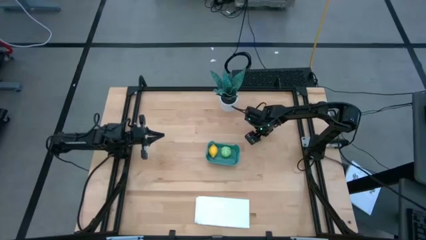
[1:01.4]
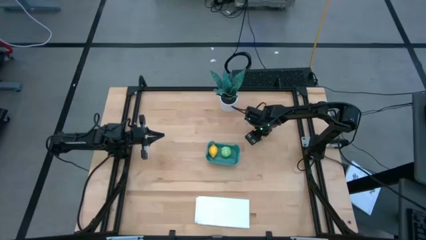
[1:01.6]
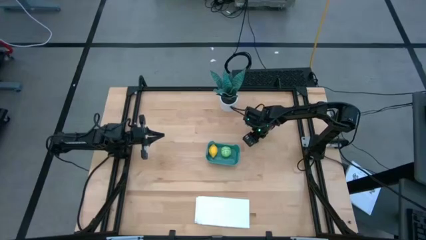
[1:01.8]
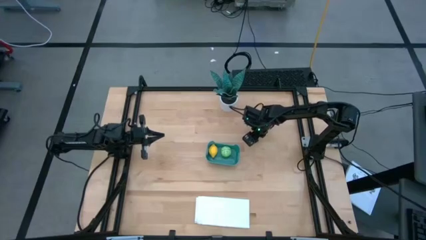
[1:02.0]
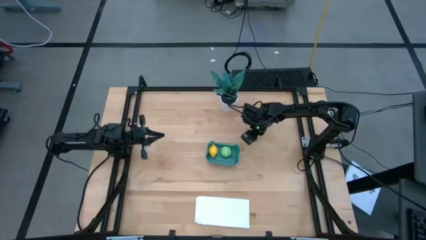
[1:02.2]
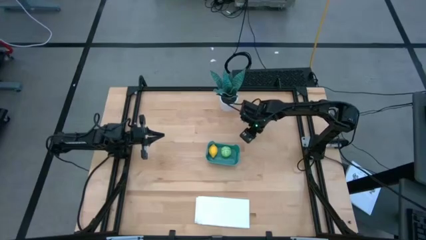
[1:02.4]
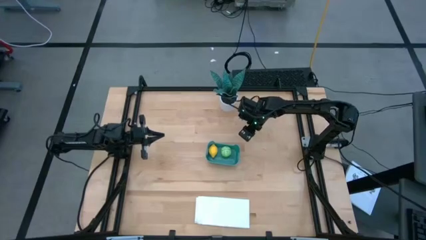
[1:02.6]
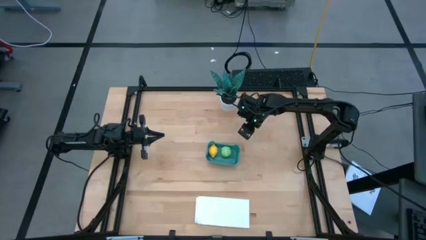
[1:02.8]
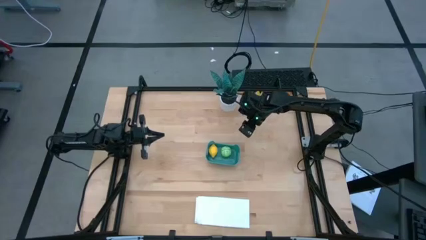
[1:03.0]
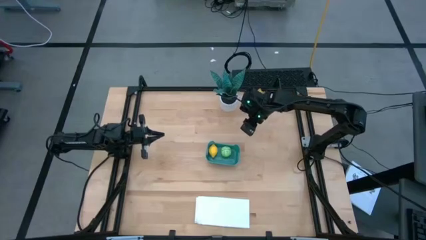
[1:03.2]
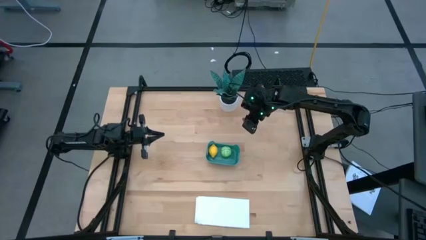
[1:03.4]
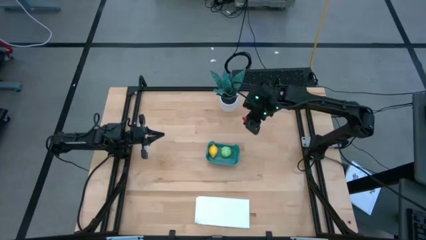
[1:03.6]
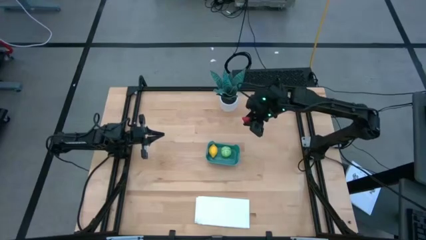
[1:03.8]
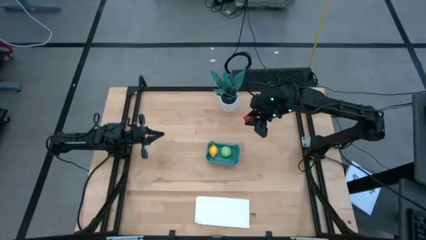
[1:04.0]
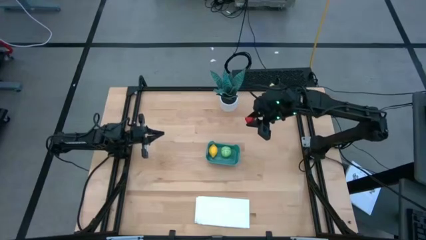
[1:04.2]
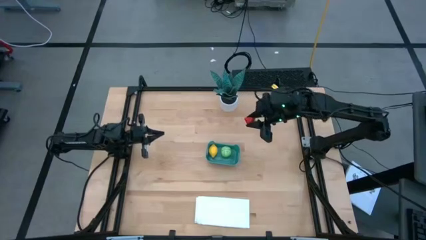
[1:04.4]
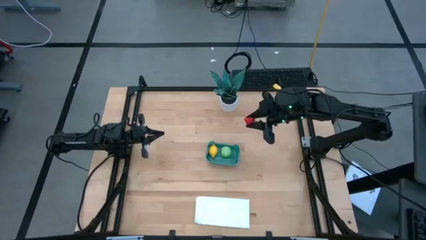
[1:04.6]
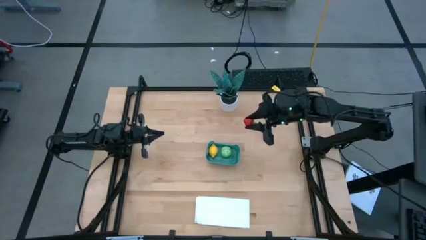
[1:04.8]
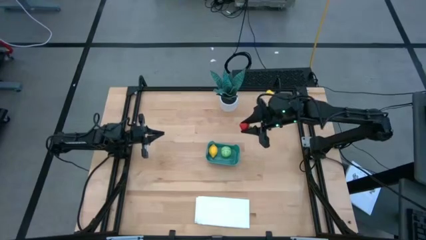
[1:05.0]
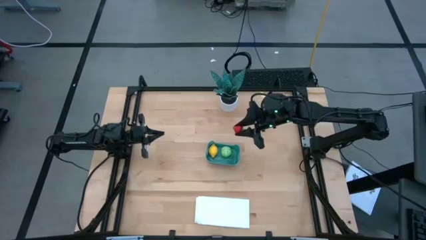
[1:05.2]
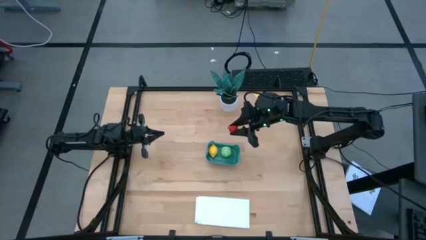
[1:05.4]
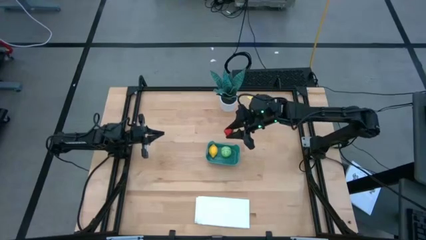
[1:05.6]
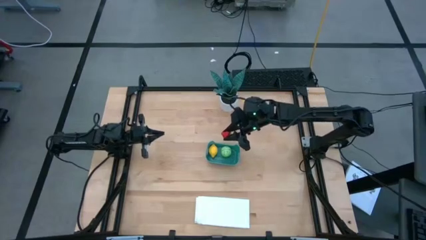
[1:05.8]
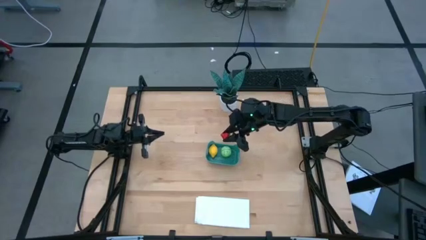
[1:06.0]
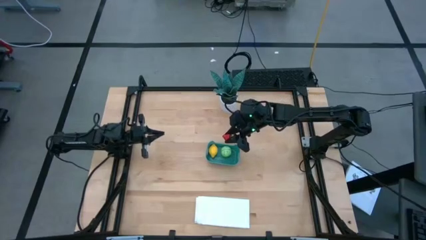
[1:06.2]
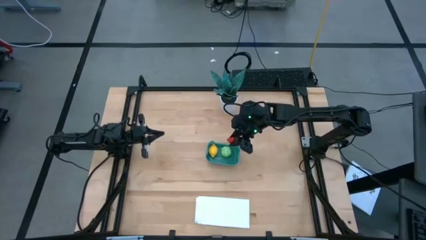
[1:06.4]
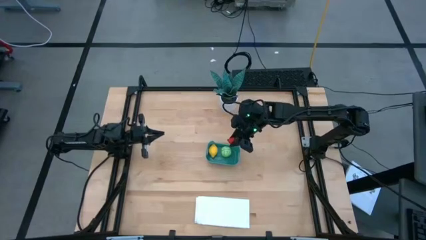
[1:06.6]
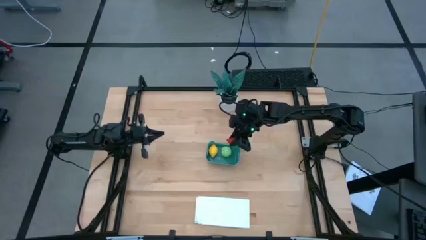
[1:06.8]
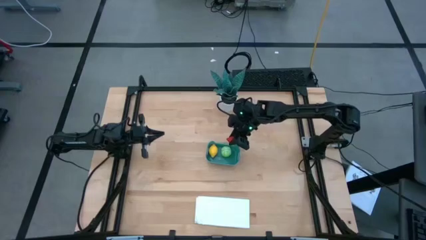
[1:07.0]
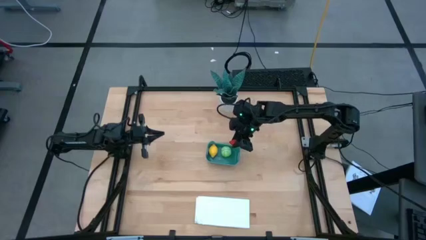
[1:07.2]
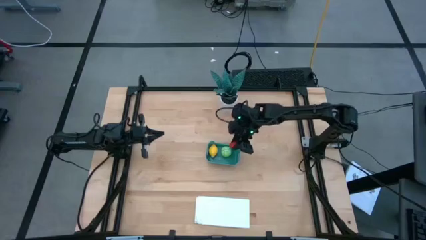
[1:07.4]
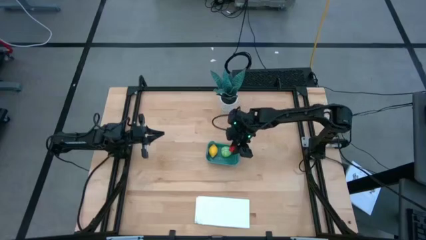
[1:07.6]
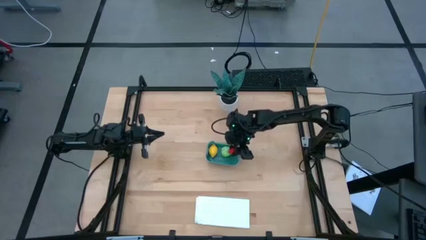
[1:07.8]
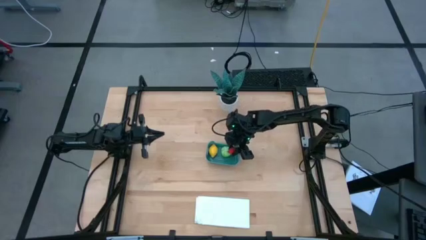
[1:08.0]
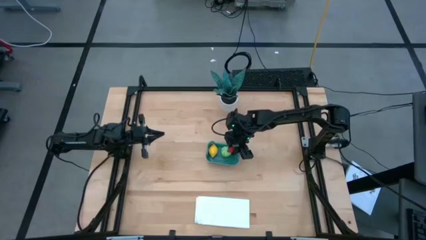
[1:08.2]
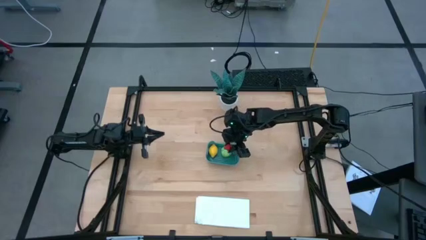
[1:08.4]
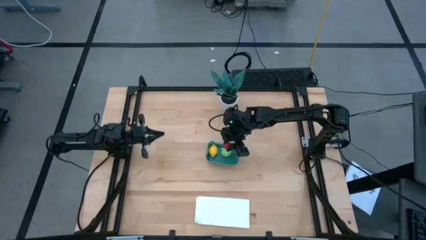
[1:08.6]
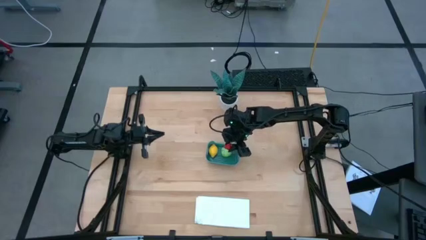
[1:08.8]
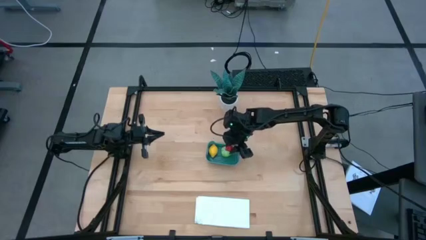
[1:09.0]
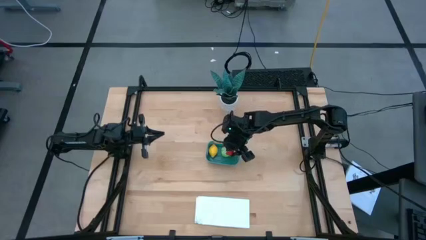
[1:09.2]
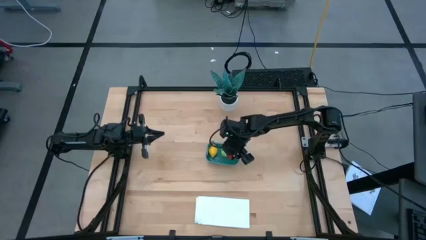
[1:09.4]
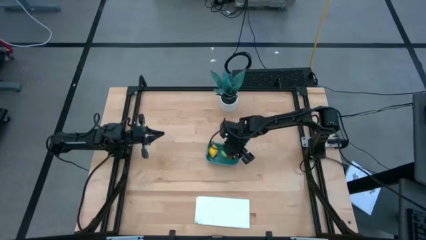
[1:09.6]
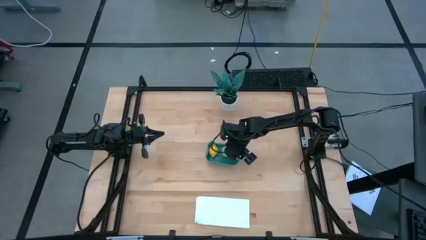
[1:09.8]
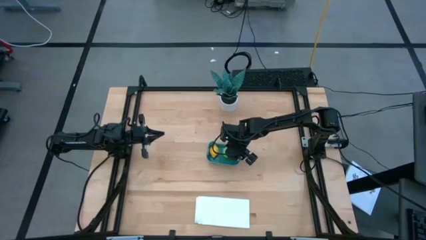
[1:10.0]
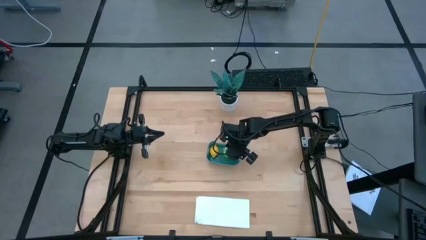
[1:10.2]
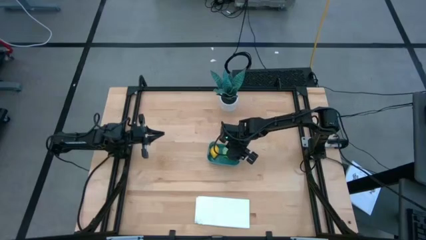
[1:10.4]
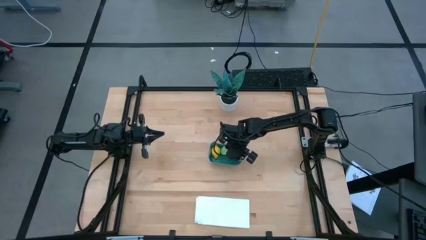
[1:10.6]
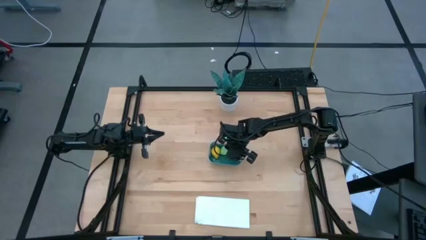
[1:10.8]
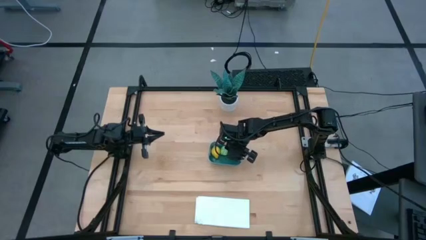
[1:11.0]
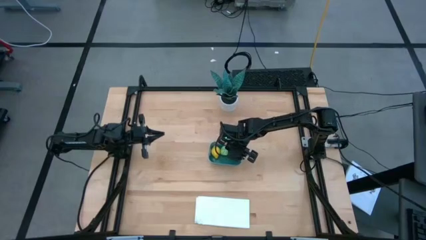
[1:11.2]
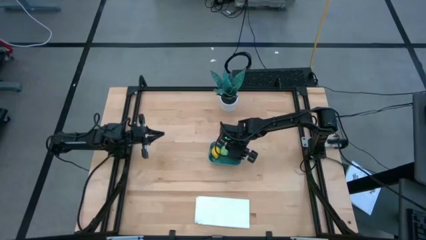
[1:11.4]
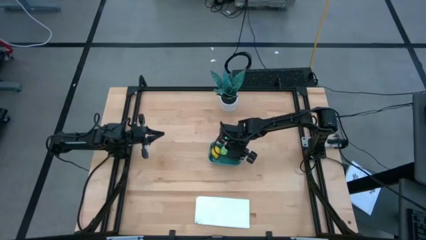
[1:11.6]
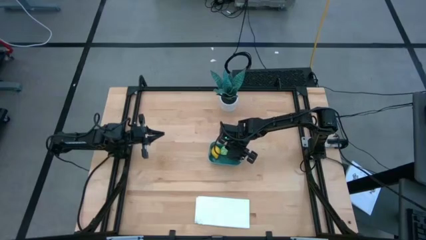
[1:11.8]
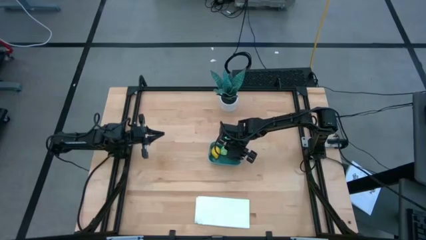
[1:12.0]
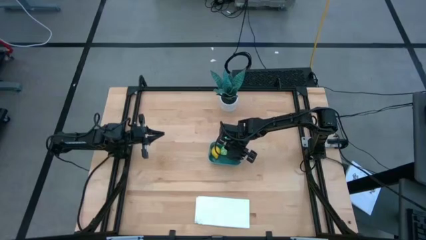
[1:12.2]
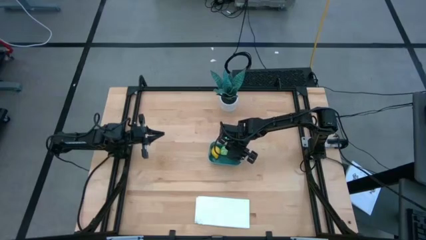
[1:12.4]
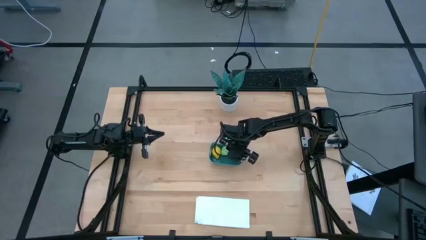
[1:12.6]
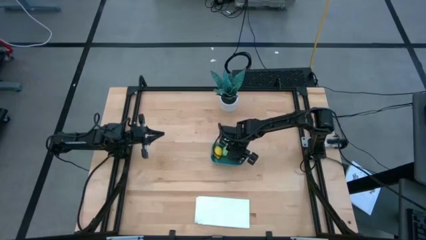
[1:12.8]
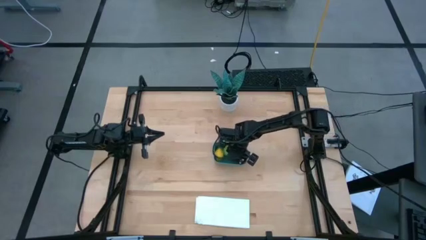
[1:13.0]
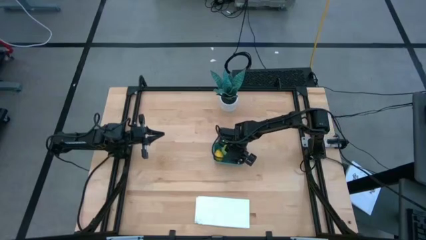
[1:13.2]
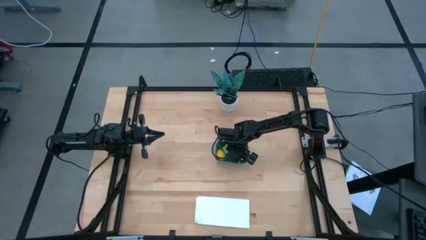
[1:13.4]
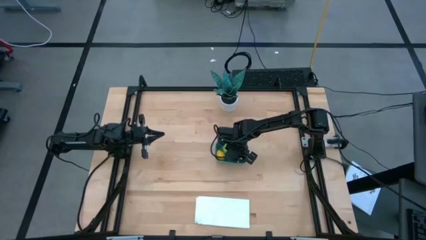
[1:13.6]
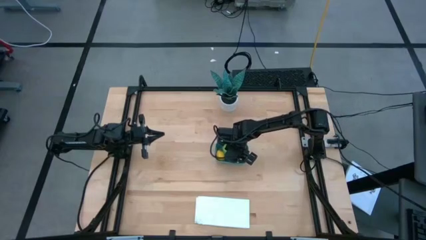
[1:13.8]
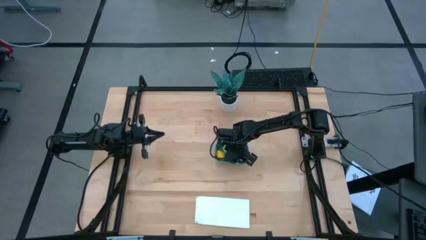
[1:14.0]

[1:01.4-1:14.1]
Task: Pick and placing Produce into tupperware
Put the red strawberry into the blue basket

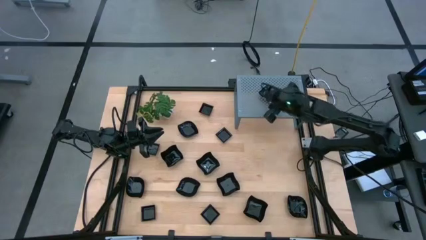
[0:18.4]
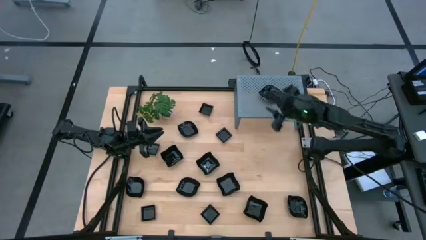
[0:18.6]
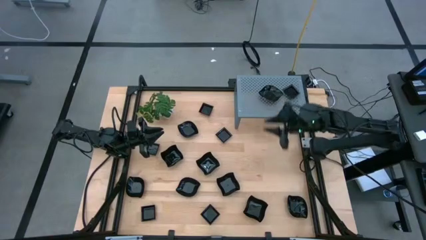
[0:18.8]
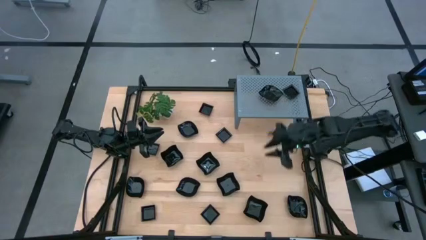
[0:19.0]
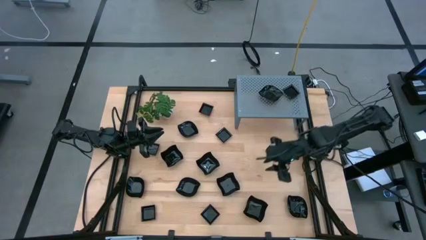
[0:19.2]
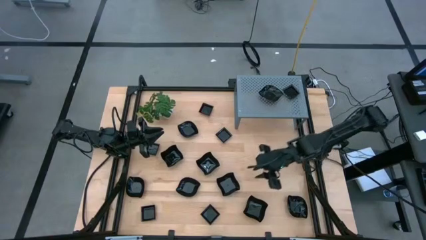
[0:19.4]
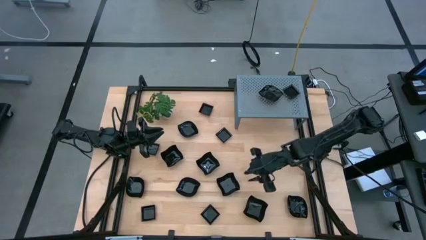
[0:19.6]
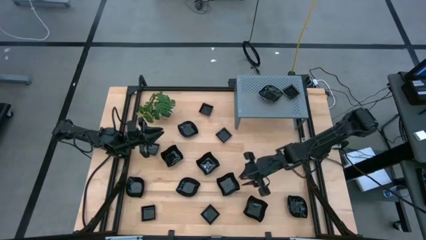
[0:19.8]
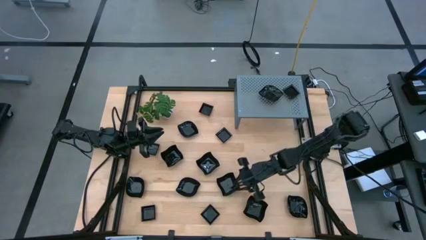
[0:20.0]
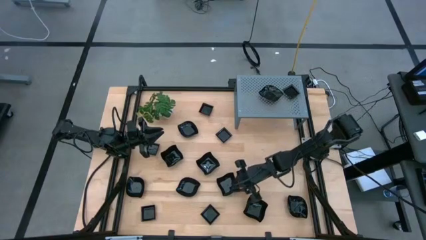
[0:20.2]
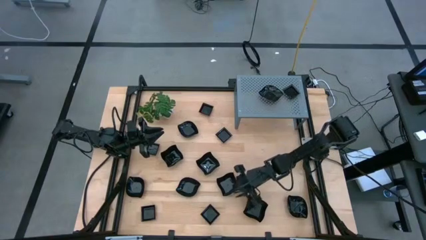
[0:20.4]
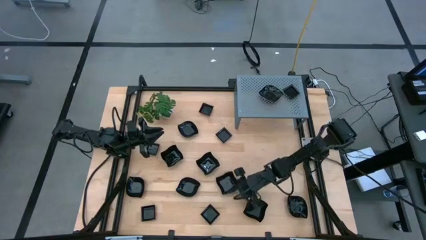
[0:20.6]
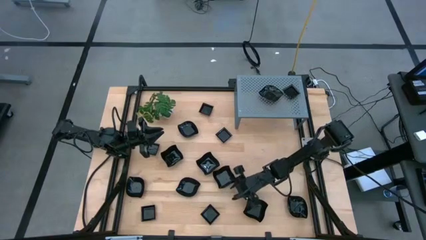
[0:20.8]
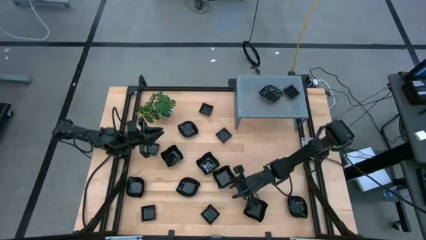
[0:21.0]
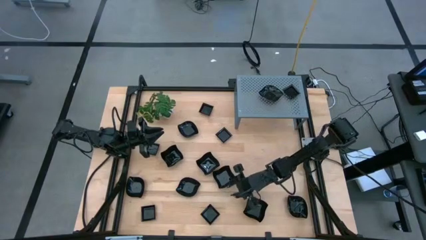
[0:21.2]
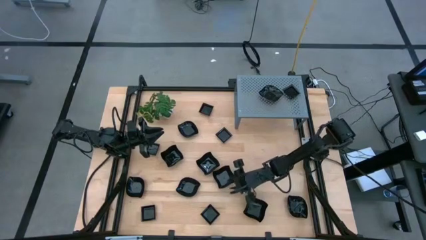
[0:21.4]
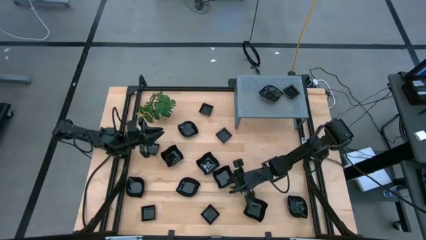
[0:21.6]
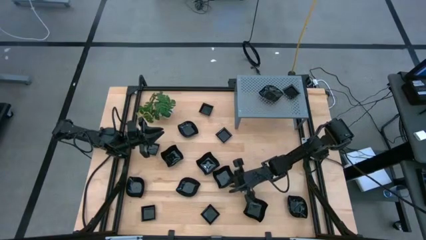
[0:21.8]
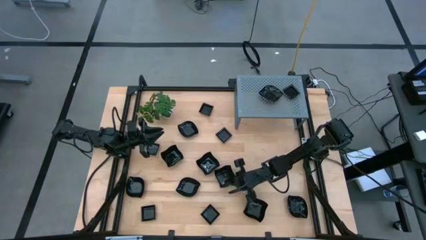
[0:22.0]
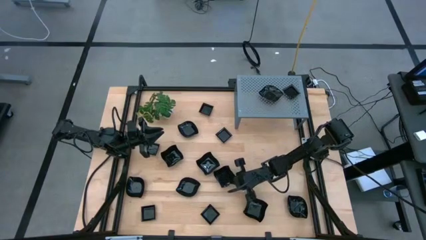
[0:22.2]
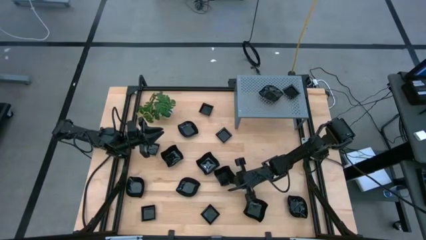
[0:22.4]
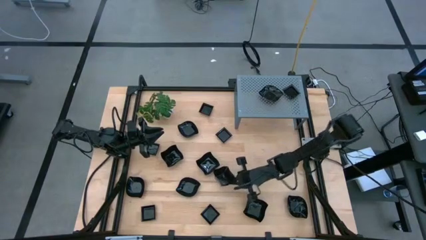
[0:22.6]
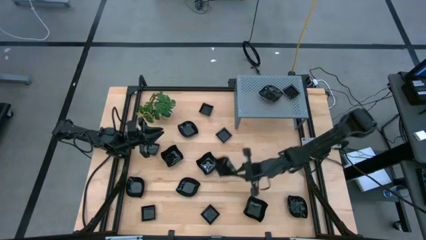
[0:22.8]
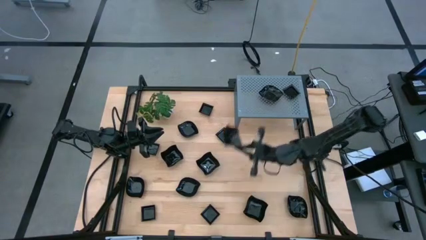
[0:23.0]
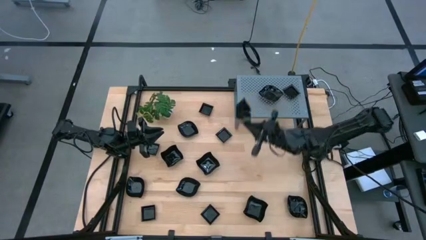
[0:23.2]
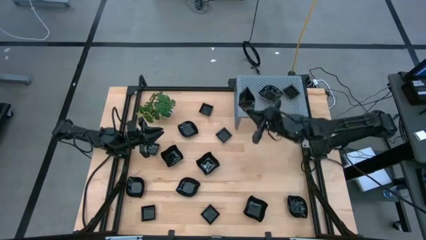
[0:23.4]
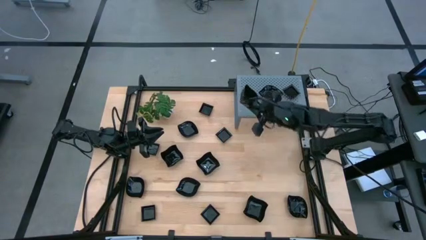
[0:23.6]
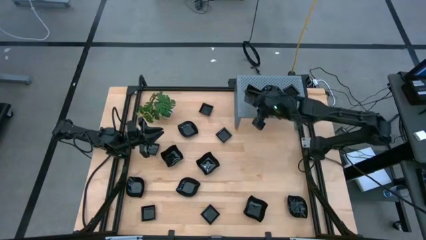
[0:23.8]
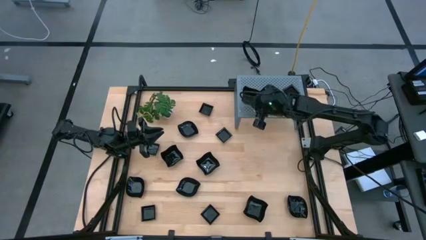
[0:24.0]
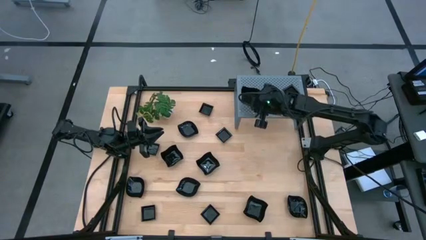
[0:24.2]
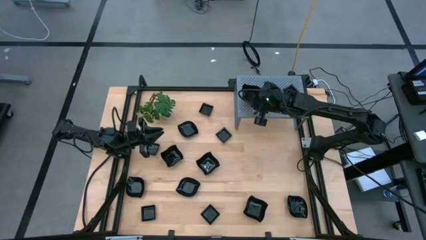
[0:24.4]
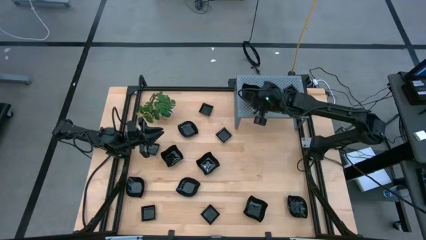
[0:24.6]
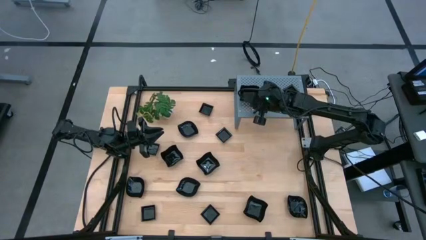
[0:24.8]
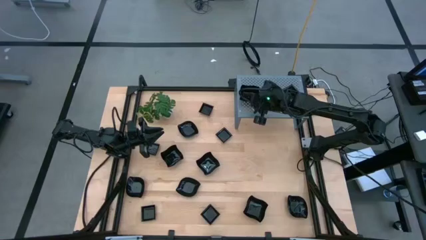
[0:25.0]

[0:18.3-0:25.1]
Task: Pick & Place Mini shaped plates
Put the distorted square plate on the shelf
